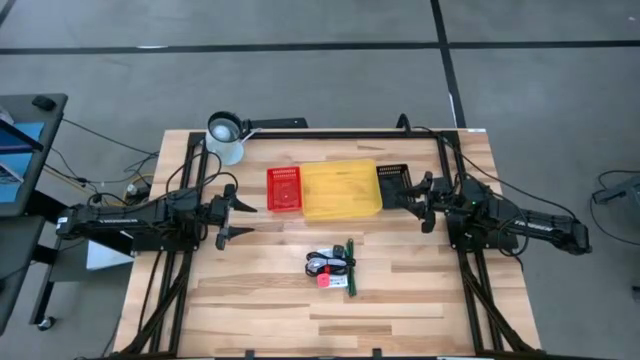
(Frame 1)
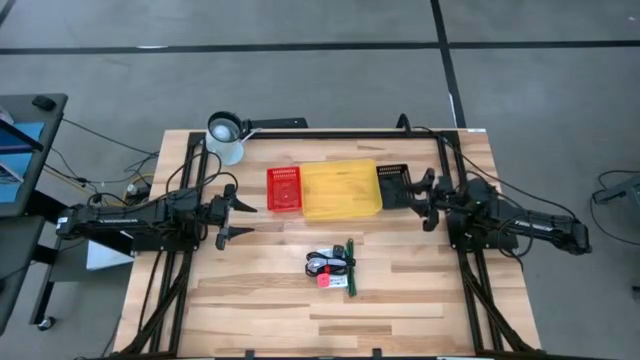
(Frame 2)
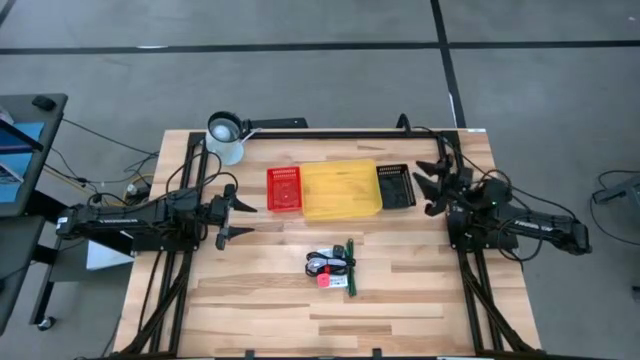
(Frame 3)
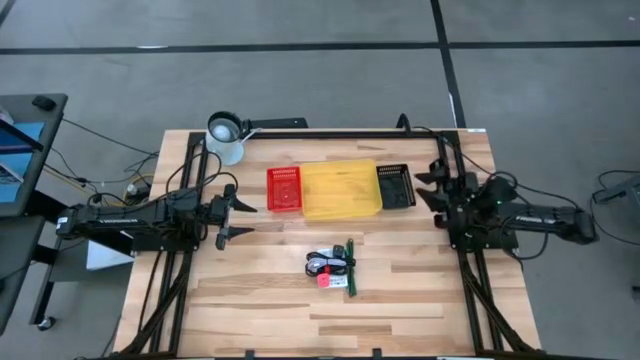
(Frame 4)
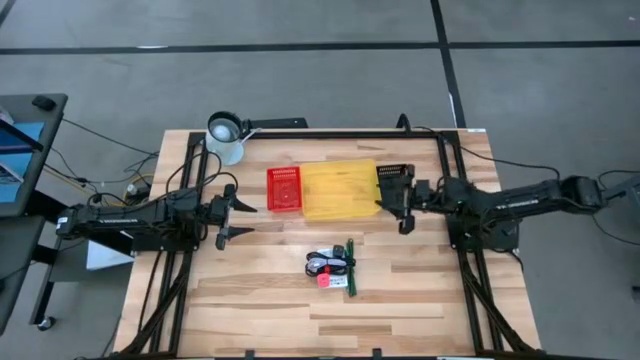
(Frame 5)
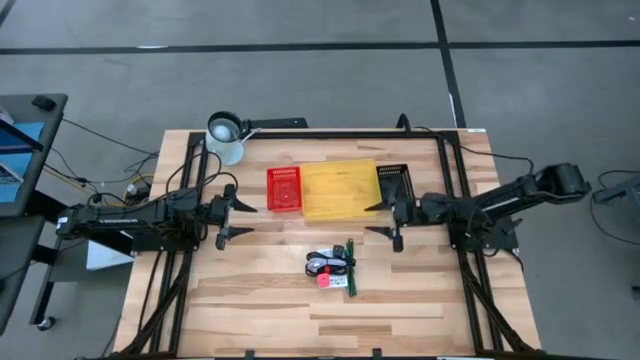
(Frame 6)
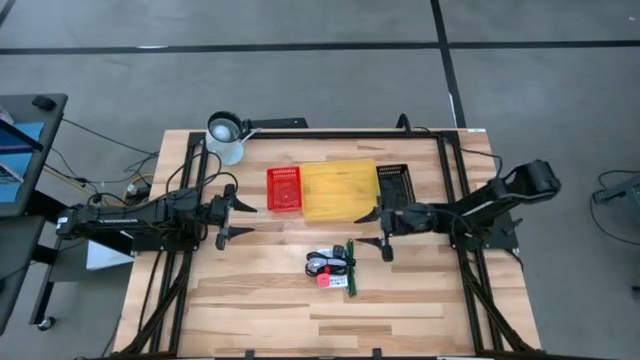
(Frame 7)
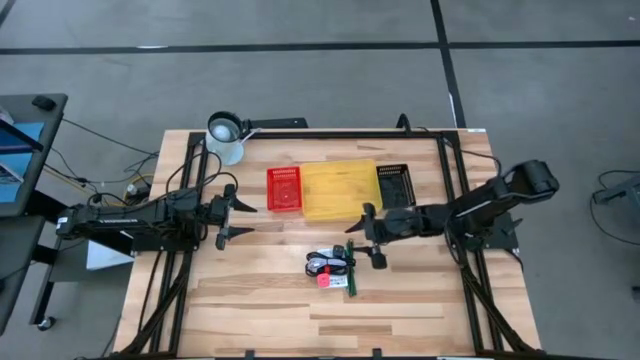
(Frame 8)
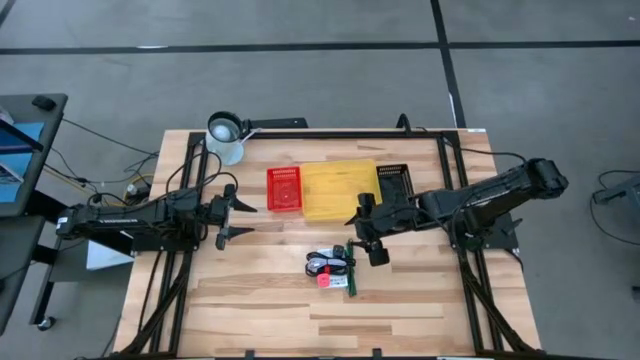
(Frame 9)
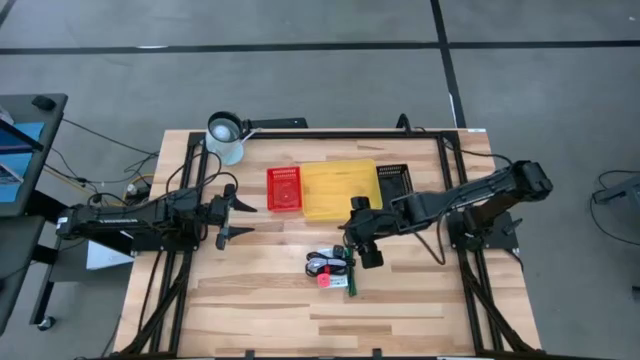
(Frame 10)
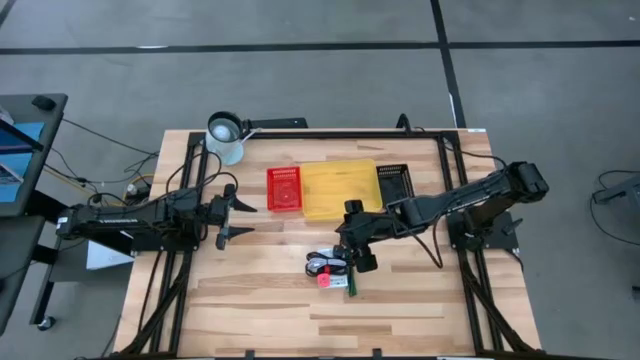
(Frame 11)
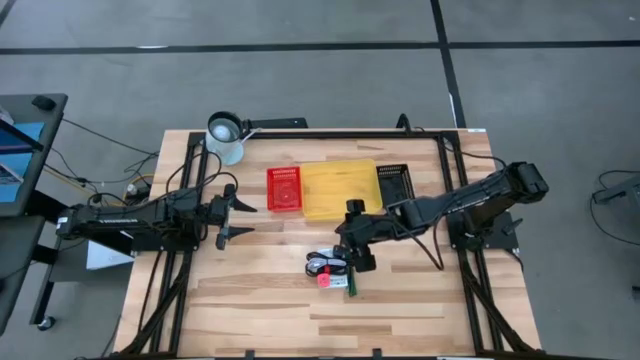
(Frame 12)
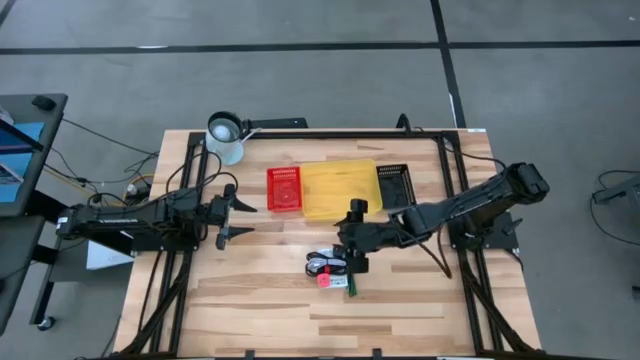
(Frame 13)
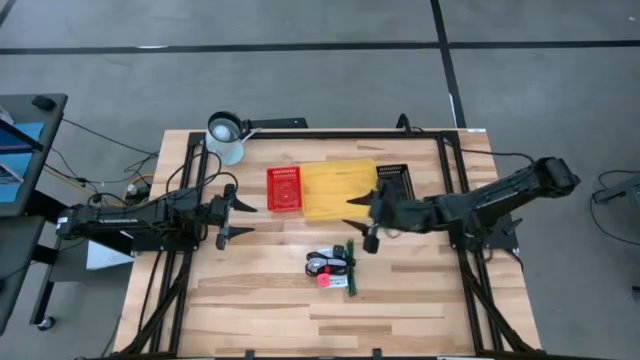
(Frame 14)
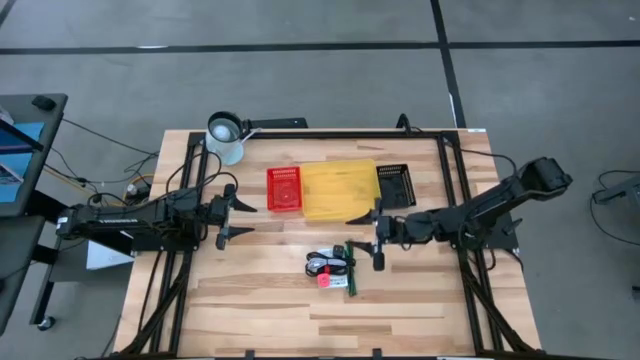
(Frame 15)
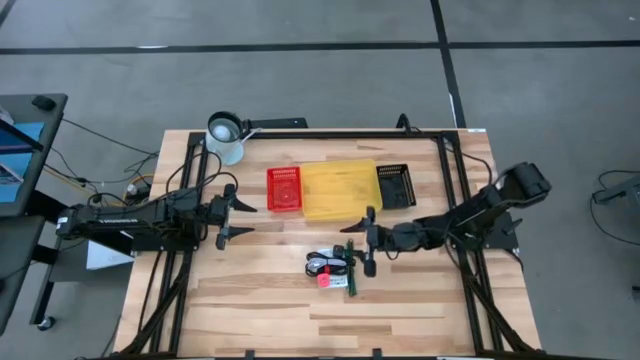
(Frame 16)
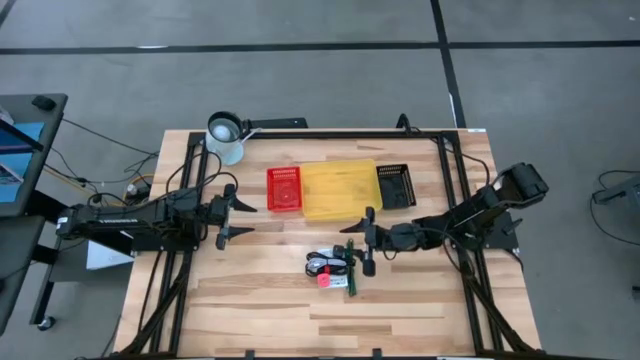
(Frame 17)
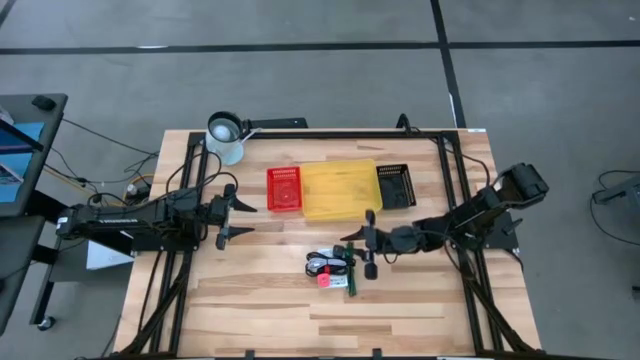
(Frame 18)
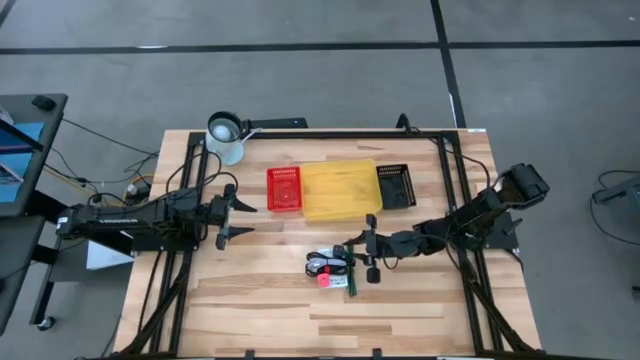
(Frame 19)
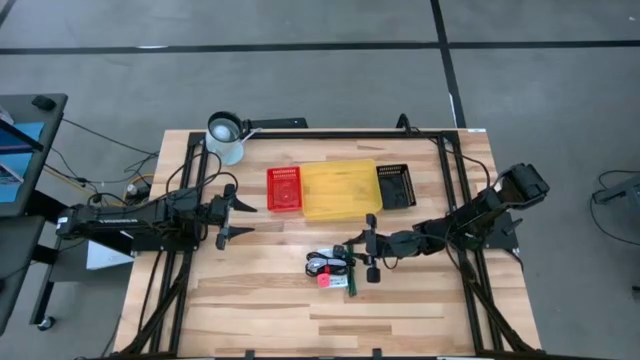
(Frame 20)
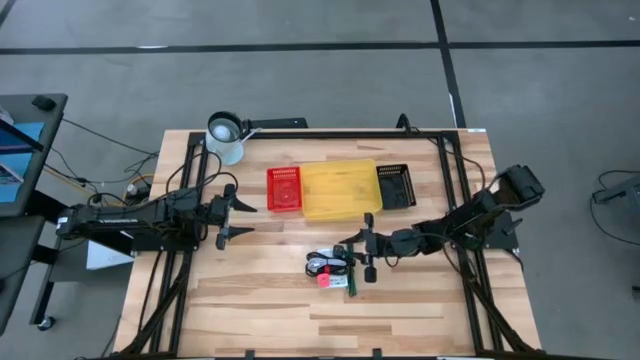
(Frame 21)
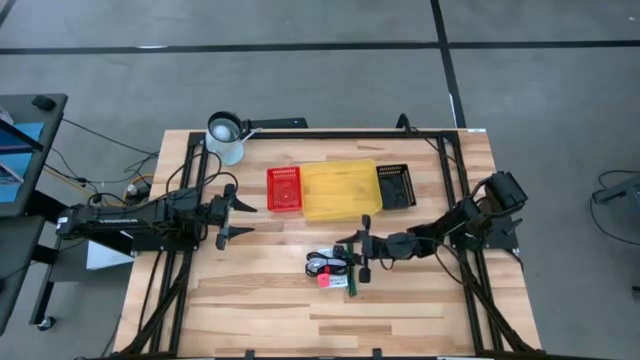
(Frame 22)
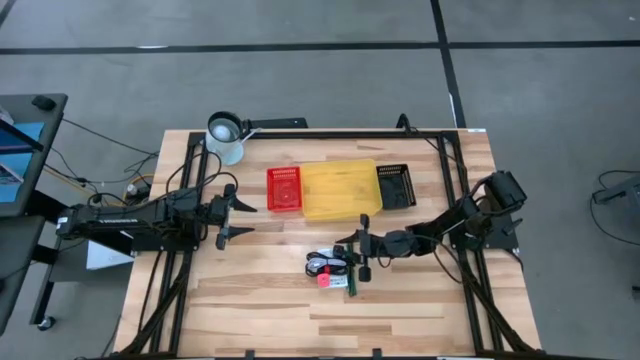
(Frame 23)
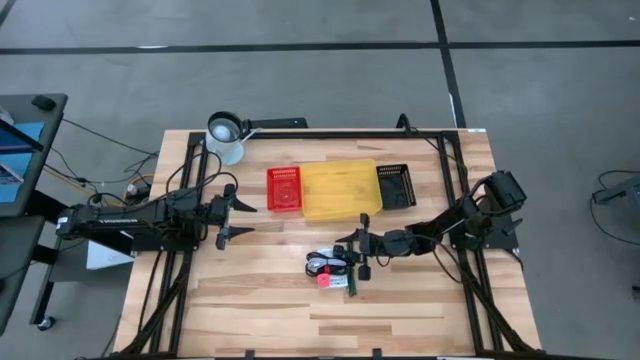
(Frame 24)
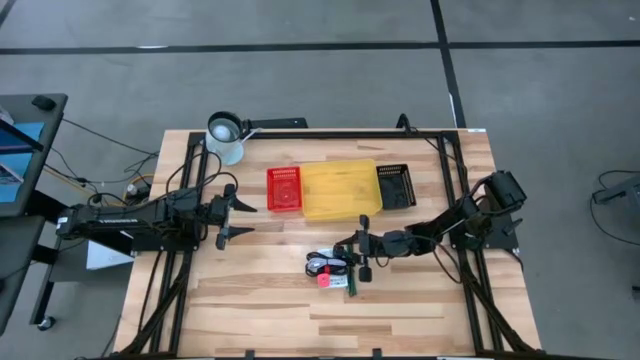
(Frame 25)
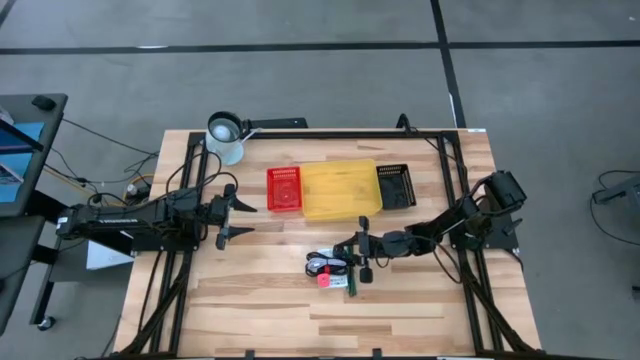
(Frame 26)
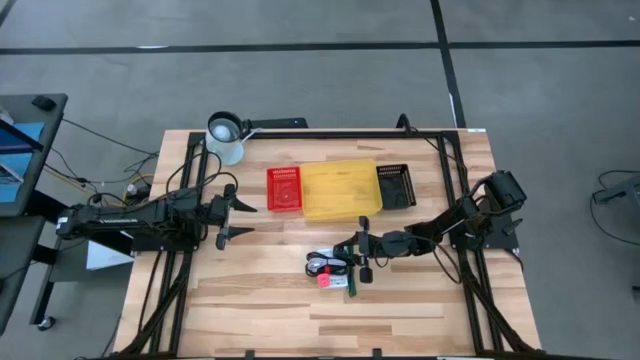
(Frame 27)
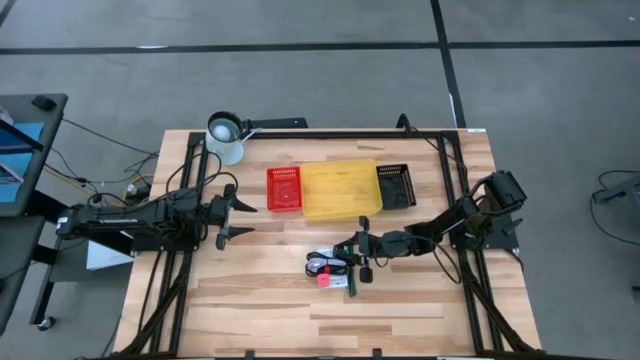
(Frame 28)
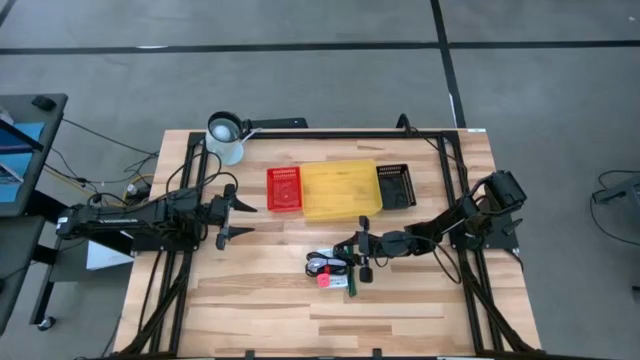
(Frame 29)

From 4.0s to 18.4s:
Task: Pick and place items into bin
Put the black charger adapter into the red bin

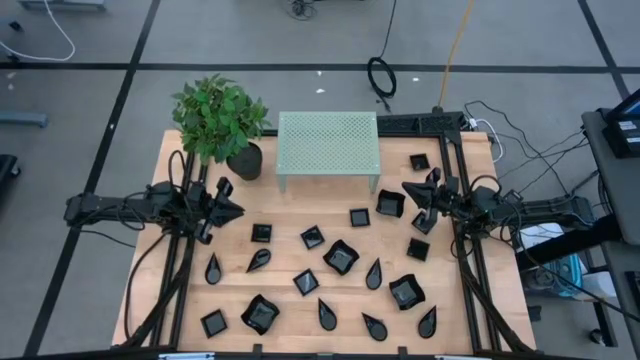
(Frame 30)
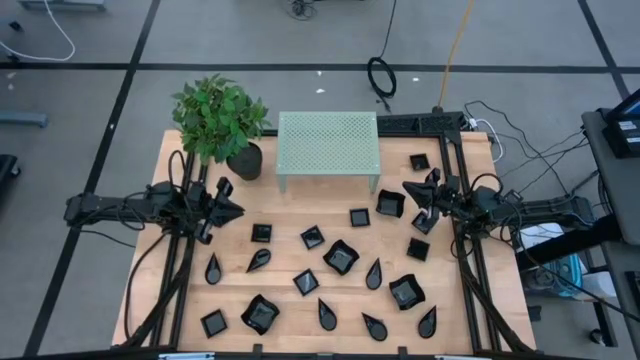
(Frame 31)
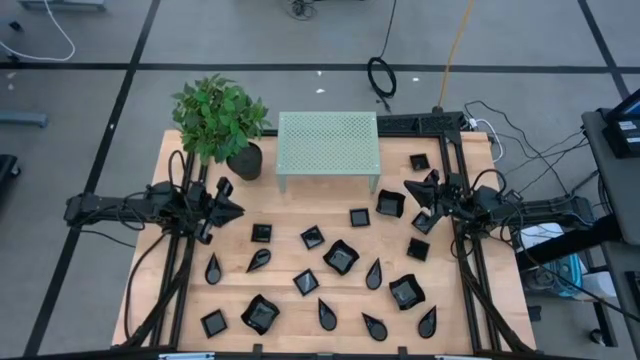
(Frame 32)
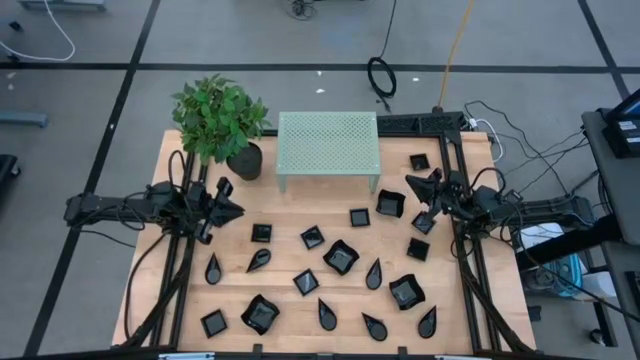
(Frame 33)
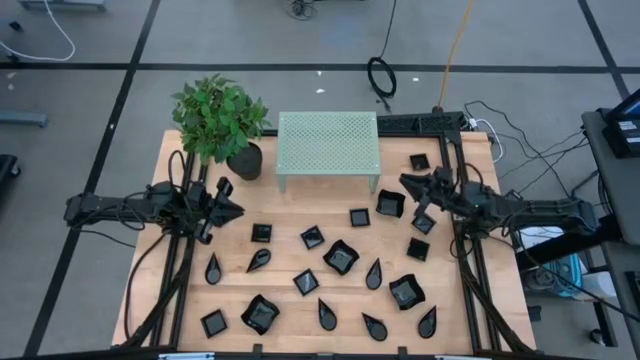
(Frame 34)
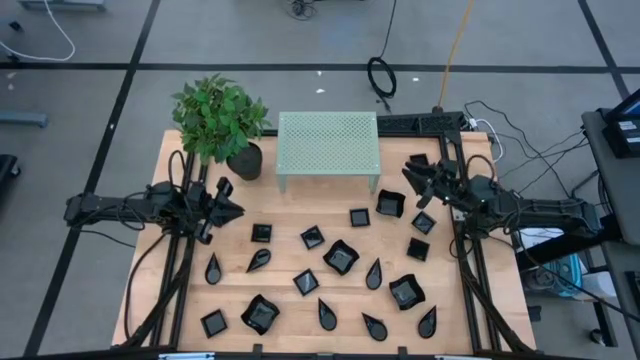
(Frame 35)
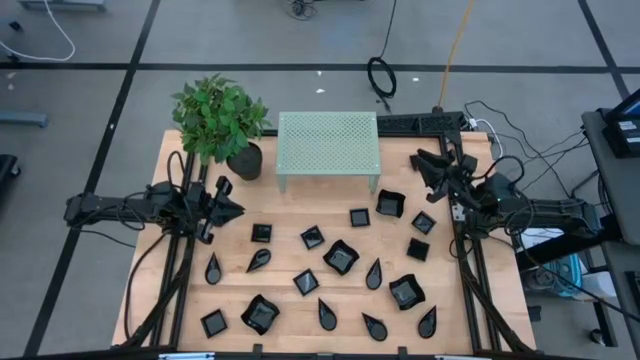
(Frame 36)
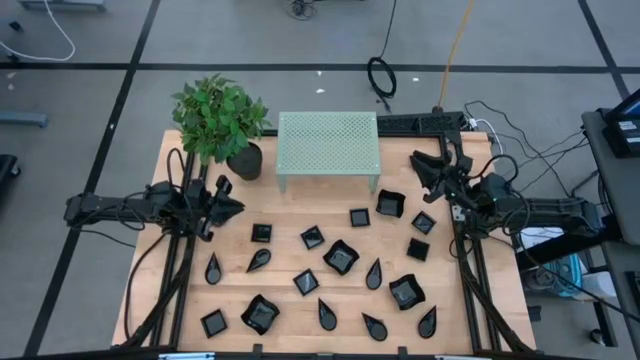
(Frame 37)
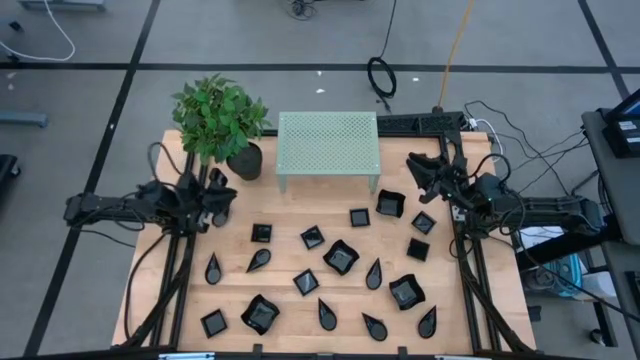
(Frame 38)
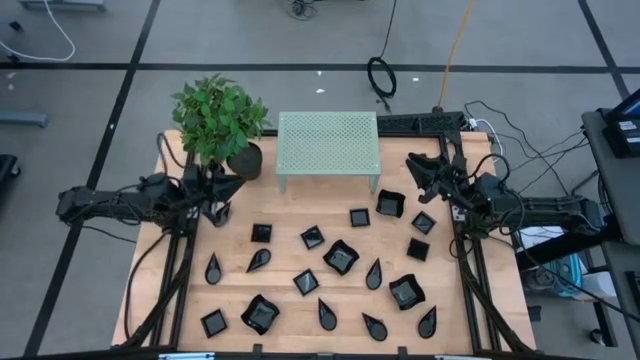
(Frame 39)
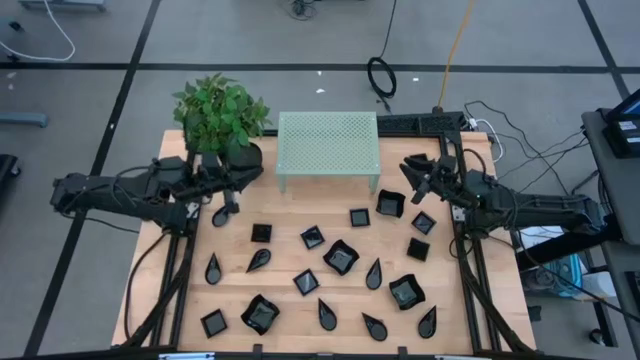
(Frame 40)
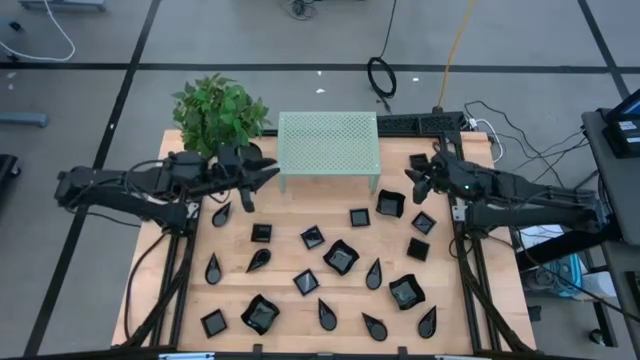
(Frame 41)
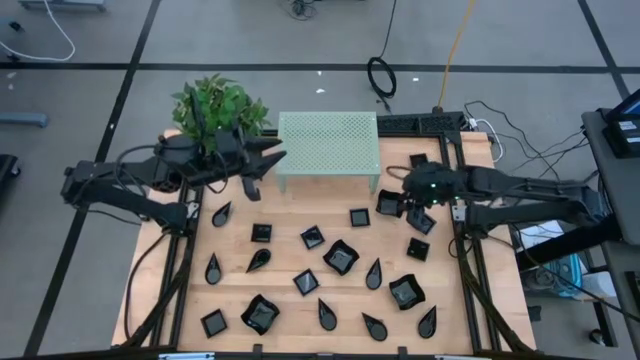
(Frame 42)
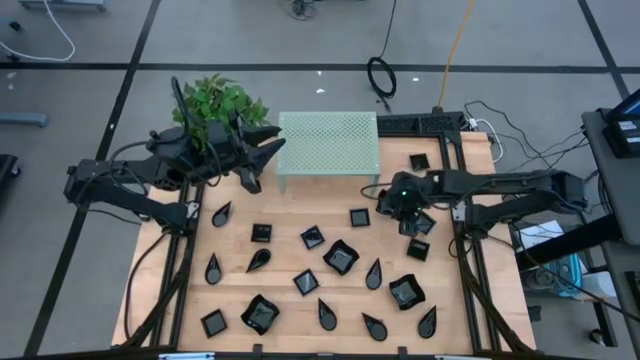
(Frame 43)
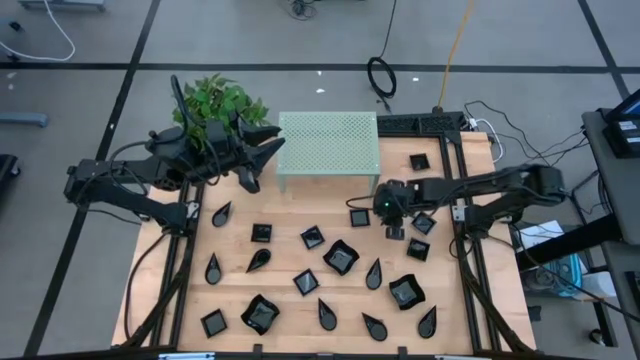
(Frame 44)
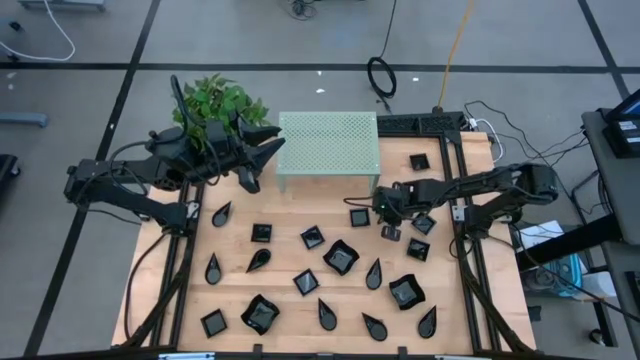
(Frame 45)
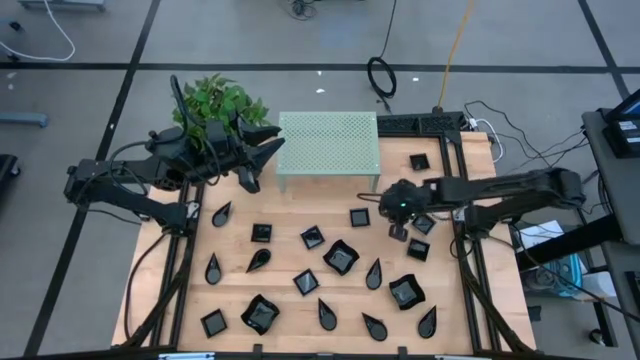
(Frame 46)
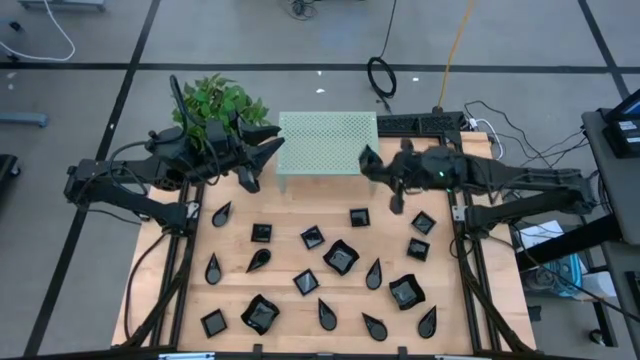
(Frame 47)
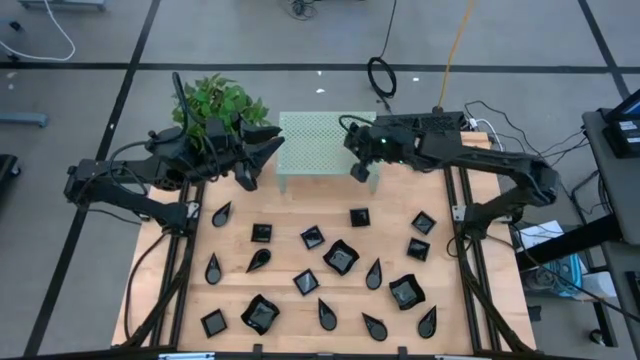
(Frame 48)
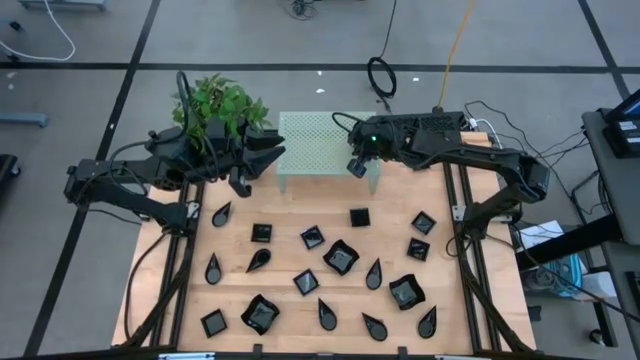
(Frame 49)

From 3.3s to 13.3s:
Task: Pick & Place Mini shaped plates
Put the distorted square plate on the shelf
